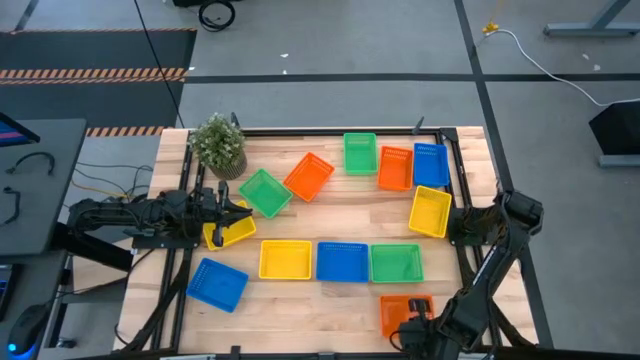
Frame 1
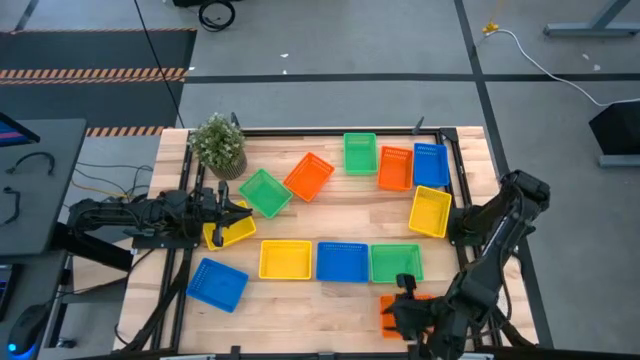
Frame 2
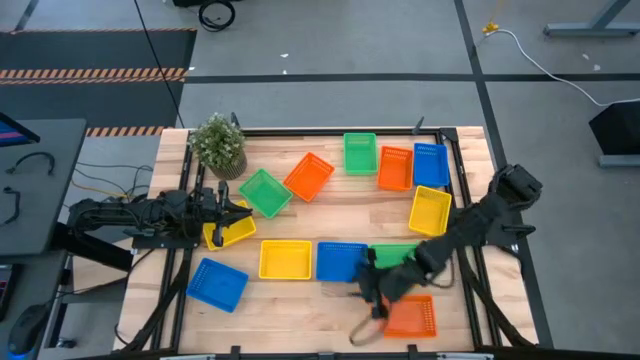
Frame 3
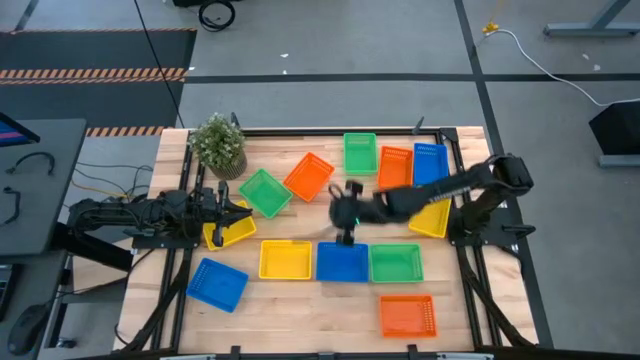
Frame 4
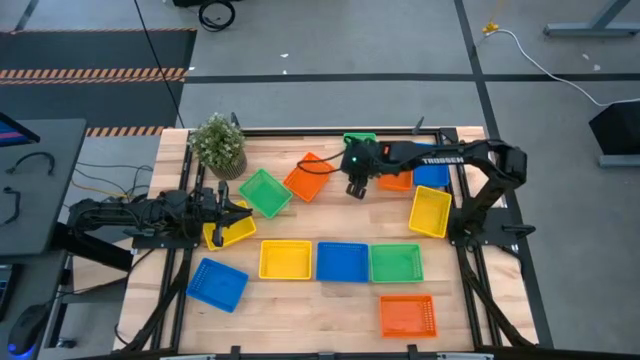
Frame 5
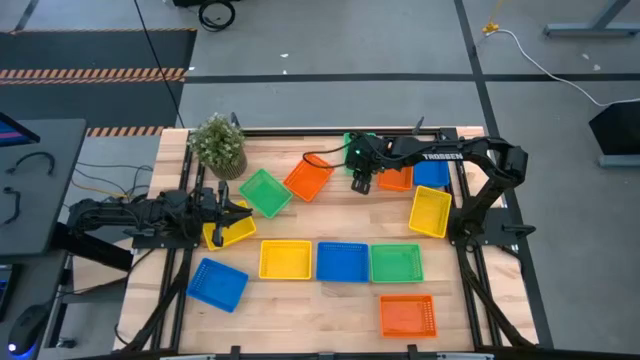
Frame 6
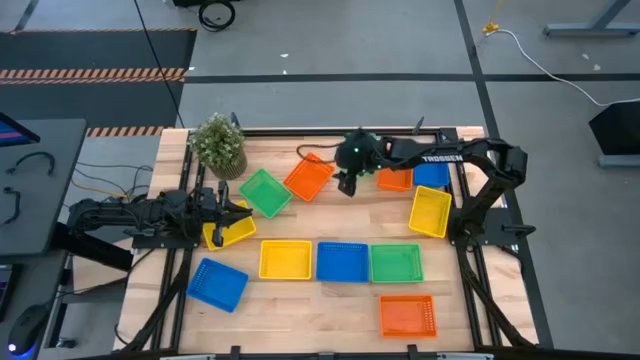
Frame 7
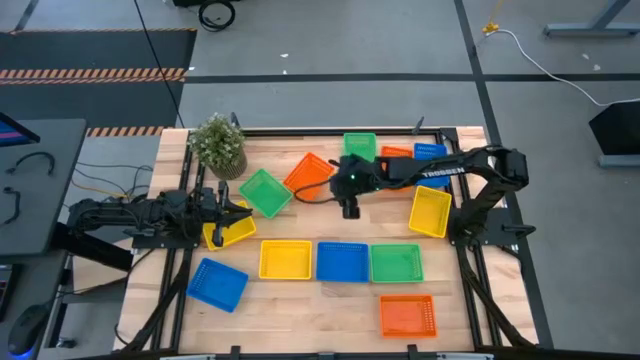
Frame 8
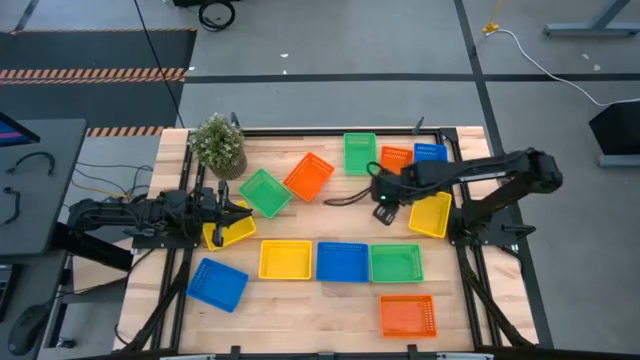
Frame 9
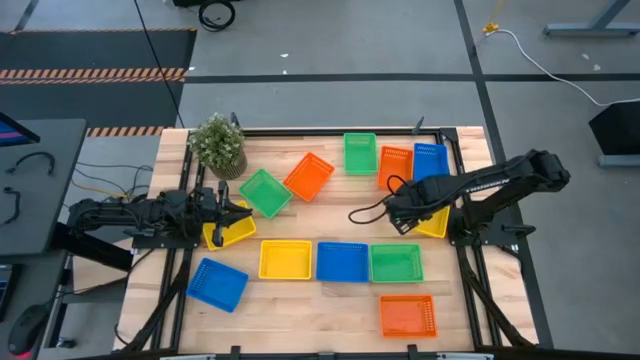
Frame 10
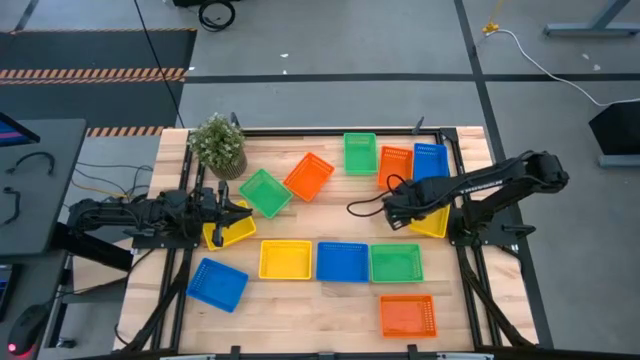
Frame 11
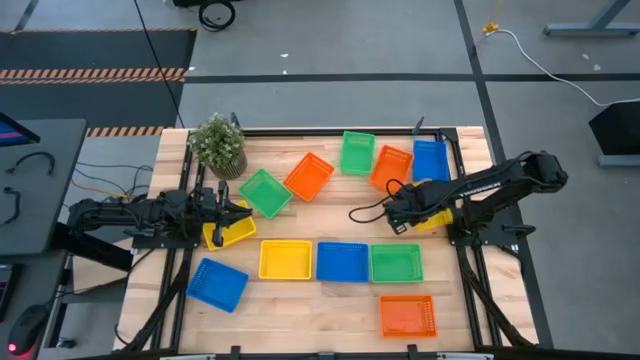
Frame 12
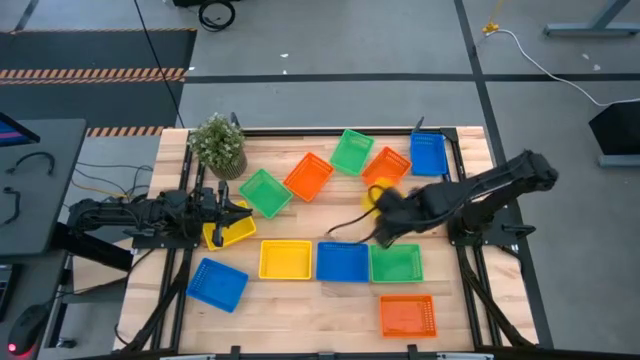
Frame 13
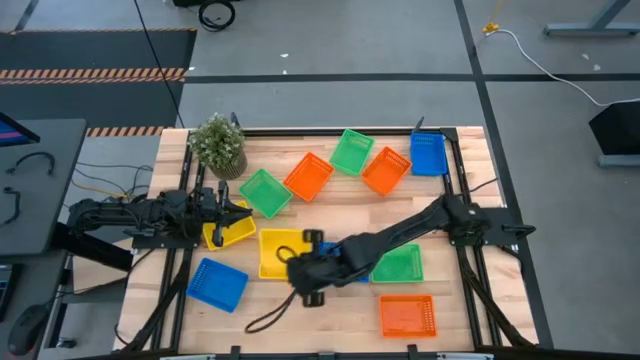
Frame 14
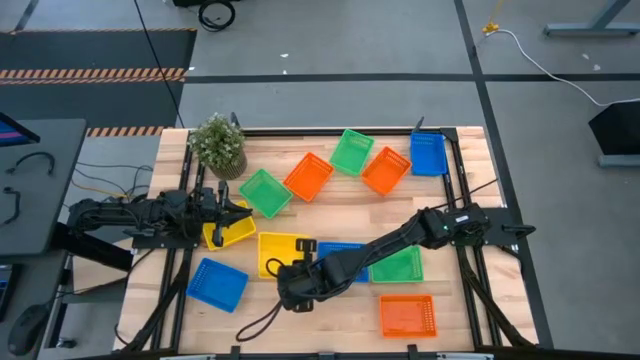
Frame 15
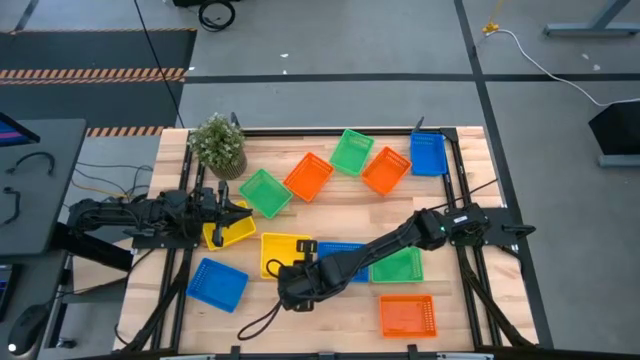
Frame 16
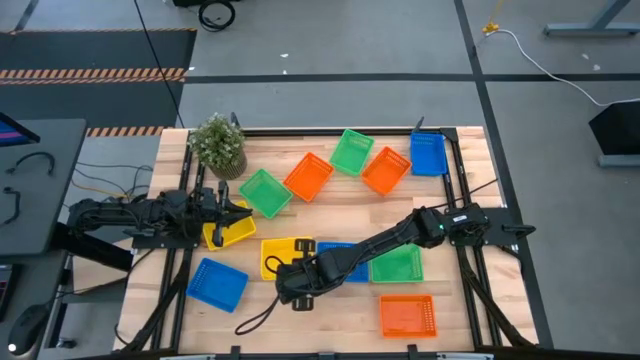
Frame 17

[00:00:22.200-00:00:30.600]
Stack the right yellow bin on top of the center yellow bin

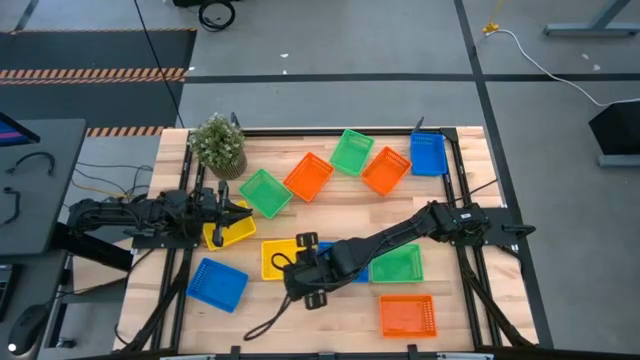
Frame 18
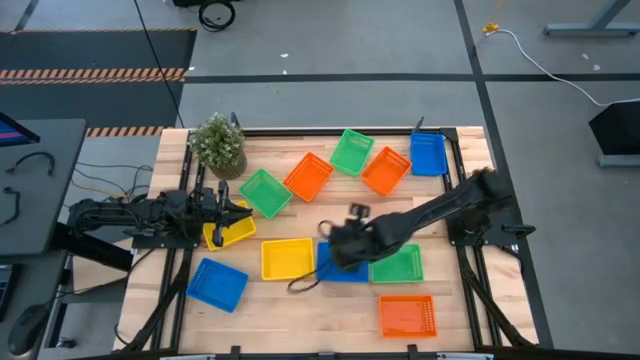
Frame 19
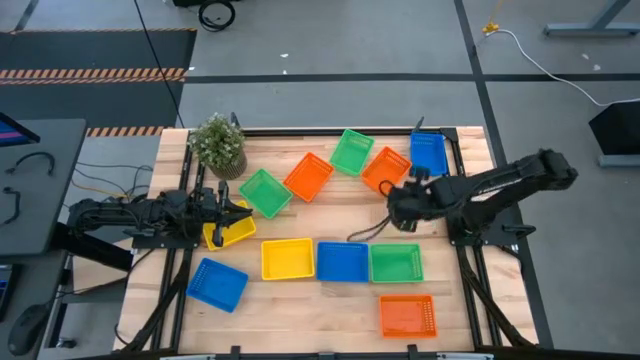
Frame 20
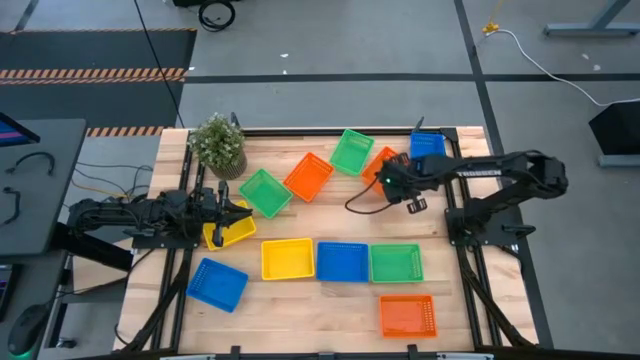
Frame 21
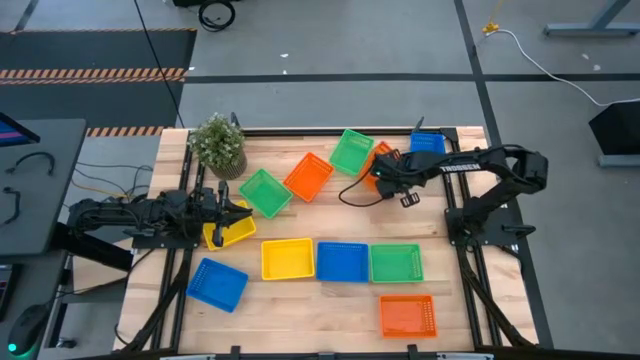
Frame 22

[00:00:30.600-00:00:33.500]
Stack the top right orange bin on top of the bottom orange bin

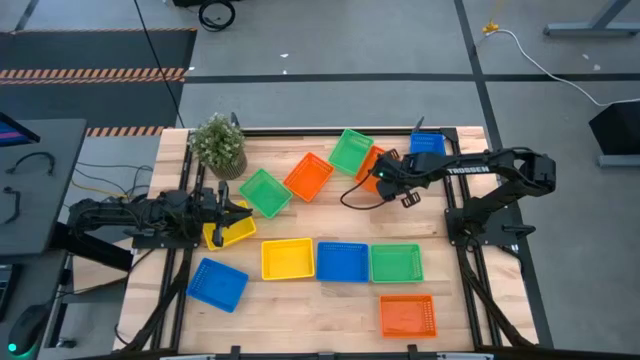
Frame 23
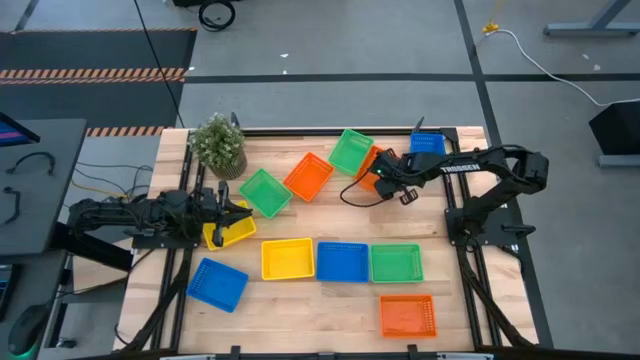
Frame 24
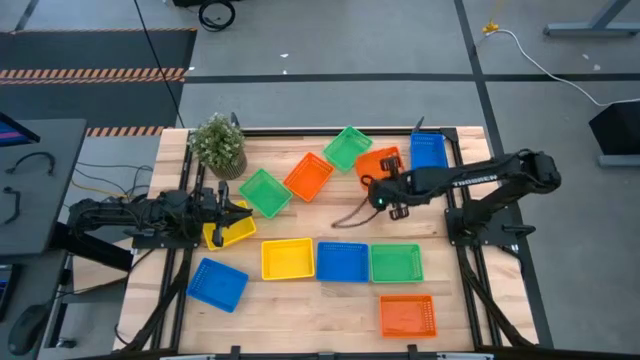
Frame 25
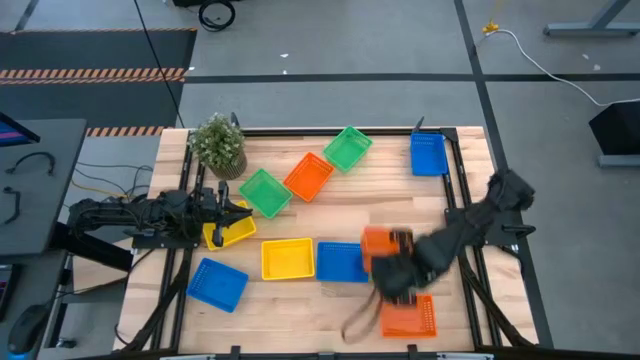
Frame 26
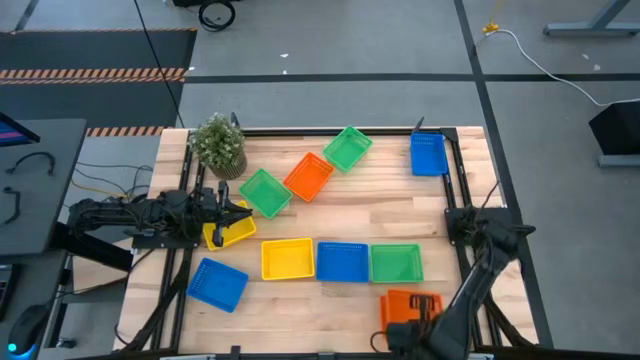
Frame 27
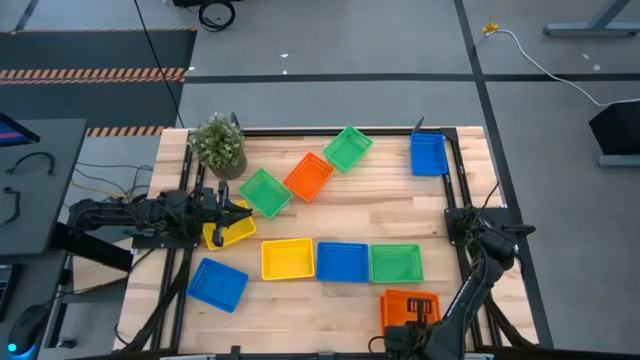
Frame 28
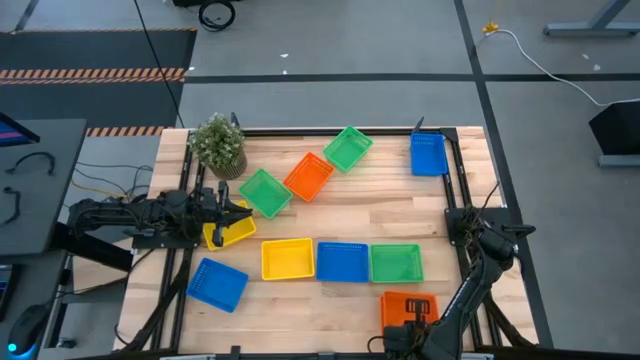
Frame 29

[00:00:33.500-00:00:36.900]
Stack the top right orange bin on top of the bottom orange bin

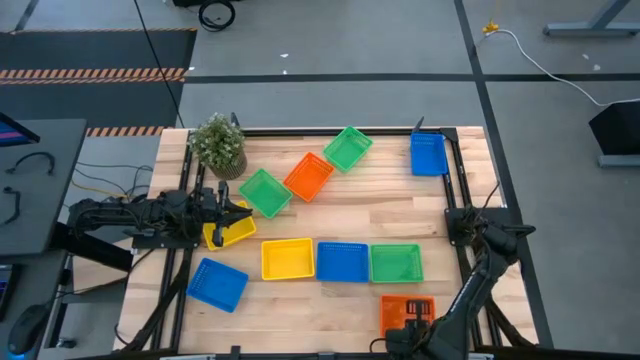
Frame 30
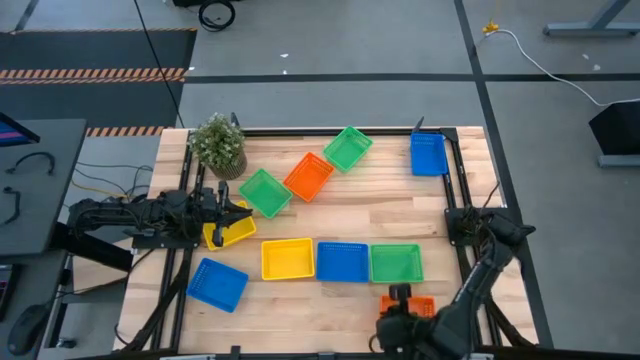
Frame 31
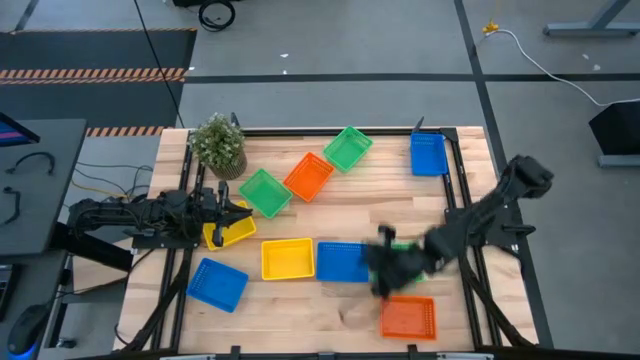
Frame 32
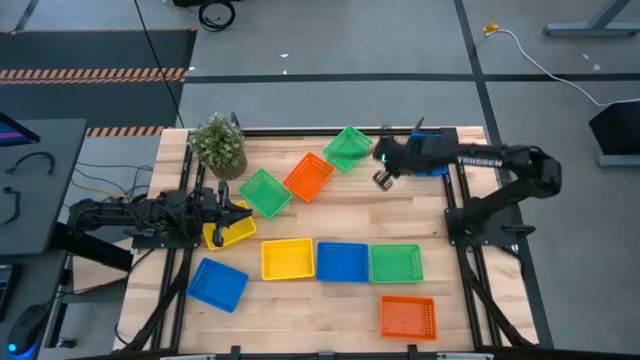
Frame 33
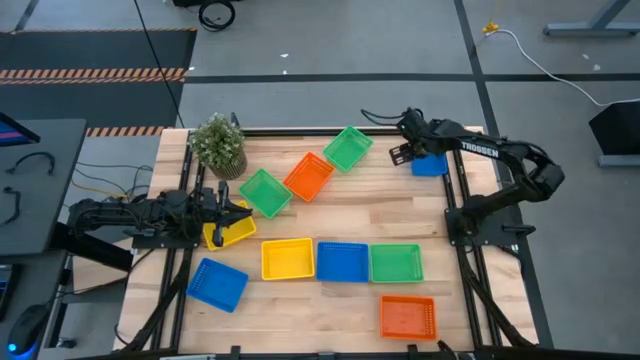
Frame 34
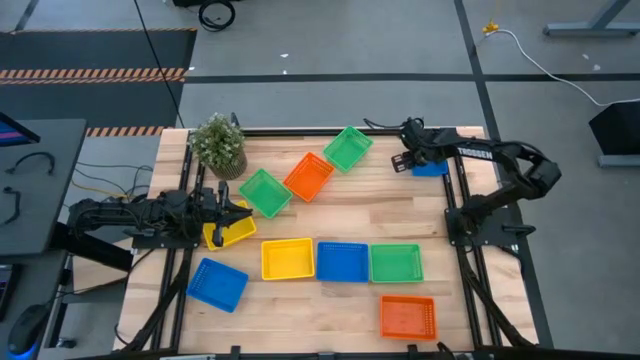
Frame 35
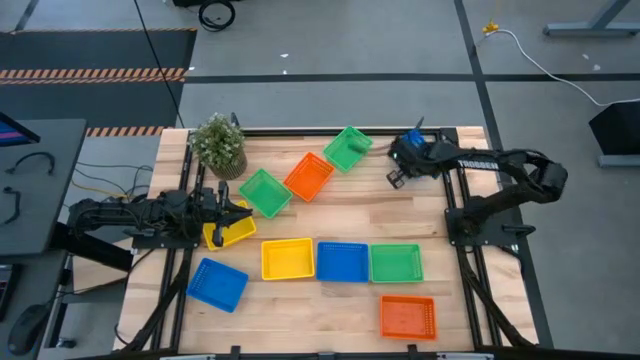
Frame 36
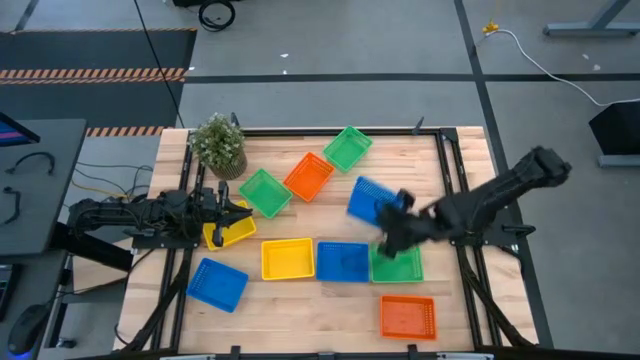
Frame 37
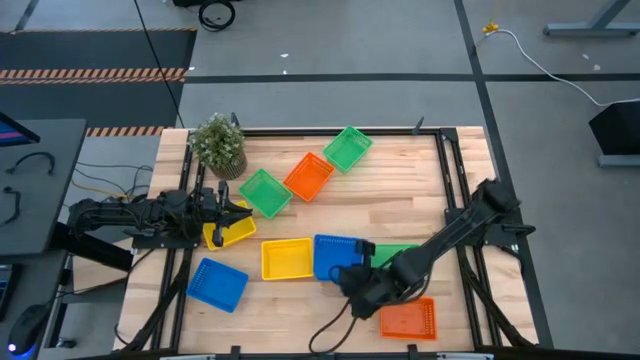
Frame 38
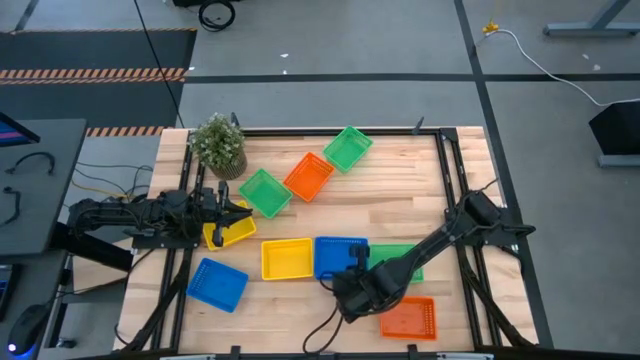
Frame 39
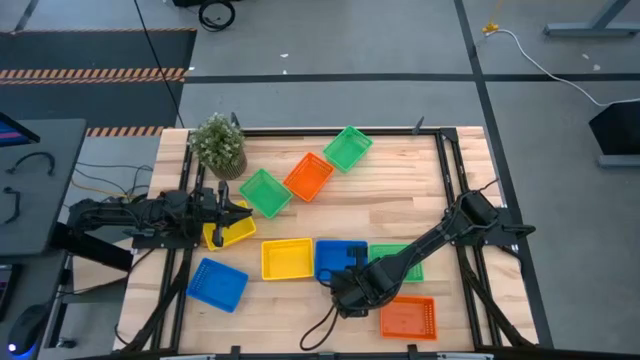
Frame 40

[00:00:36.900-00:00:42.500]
Stack the top right blue bin on top of the bottom right blue bin
